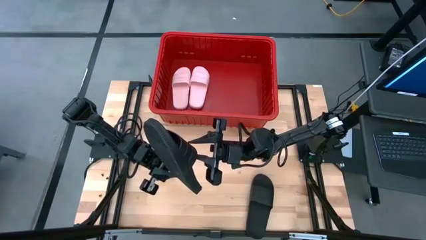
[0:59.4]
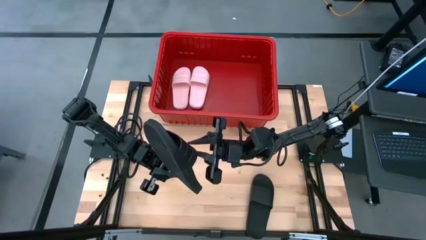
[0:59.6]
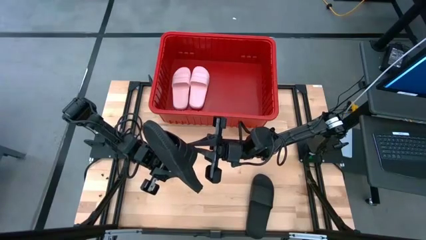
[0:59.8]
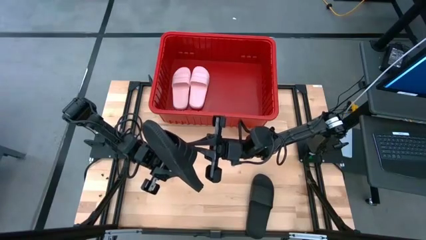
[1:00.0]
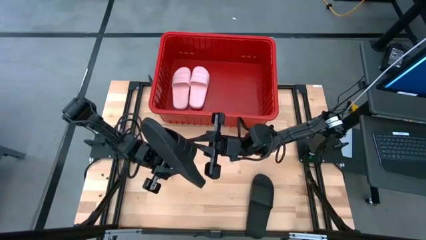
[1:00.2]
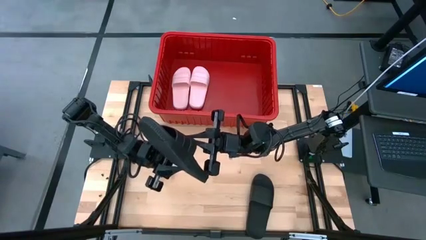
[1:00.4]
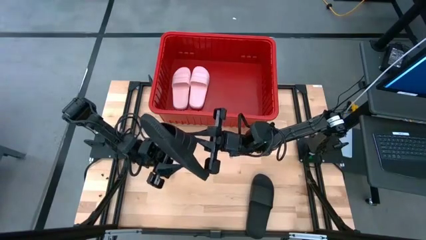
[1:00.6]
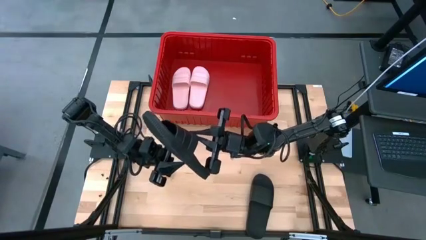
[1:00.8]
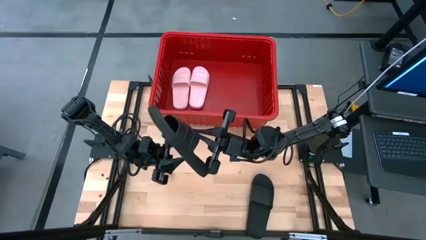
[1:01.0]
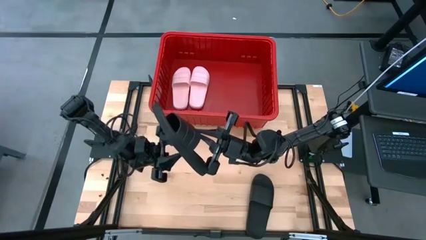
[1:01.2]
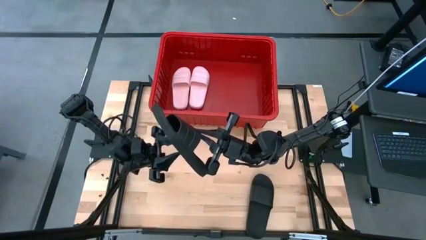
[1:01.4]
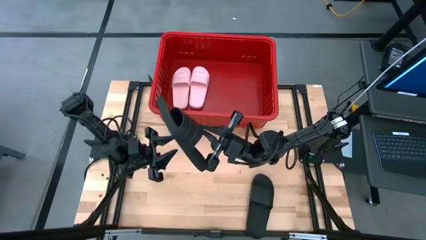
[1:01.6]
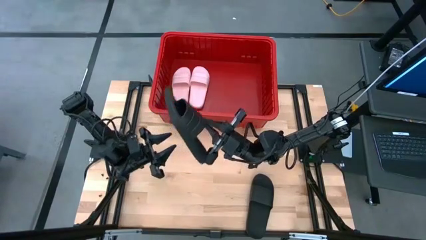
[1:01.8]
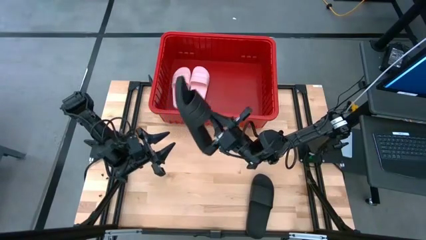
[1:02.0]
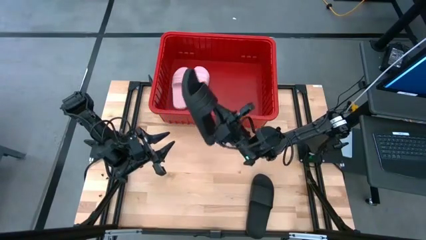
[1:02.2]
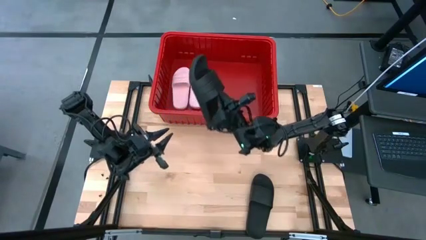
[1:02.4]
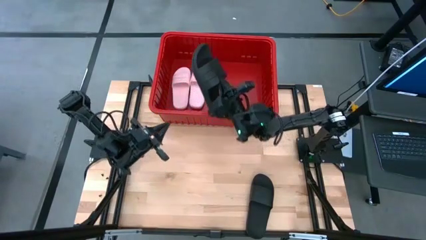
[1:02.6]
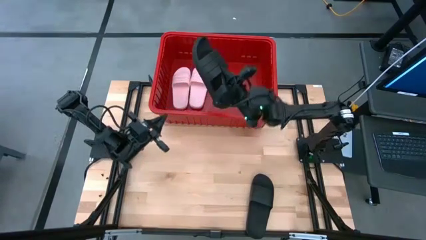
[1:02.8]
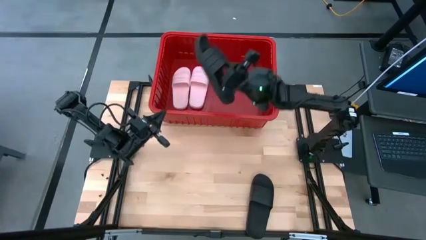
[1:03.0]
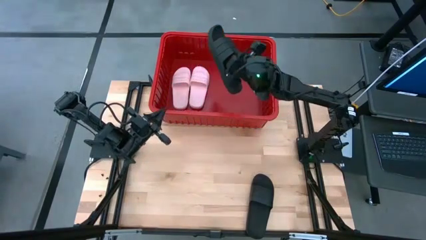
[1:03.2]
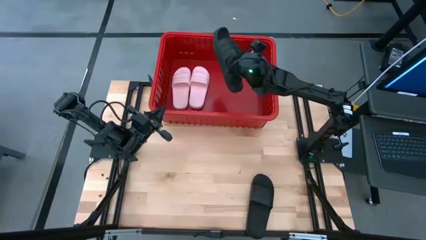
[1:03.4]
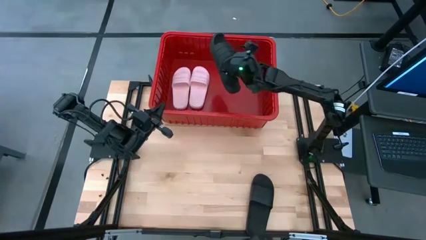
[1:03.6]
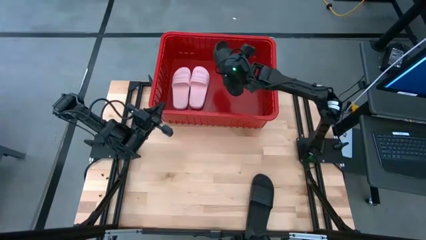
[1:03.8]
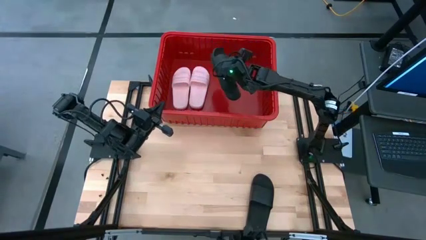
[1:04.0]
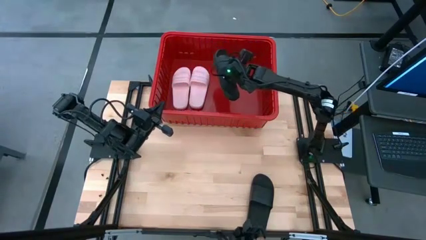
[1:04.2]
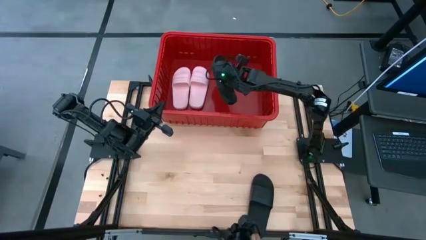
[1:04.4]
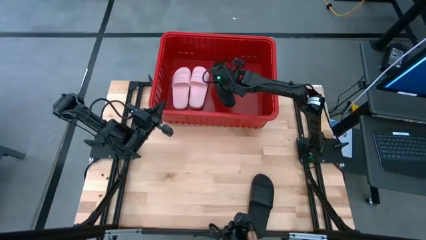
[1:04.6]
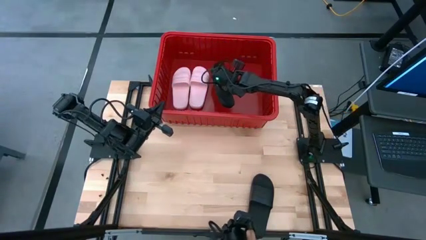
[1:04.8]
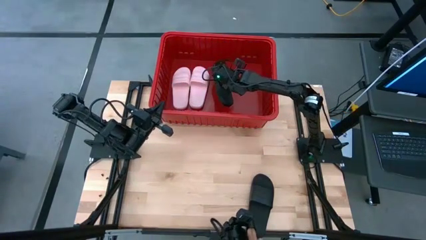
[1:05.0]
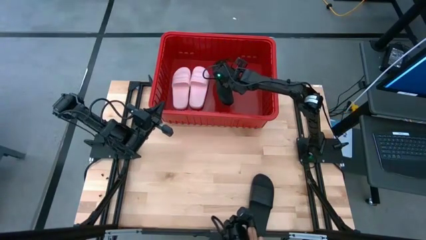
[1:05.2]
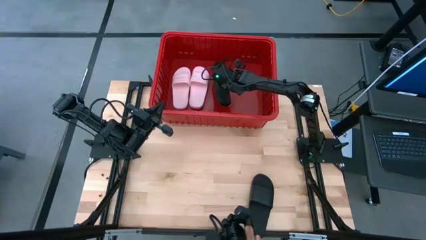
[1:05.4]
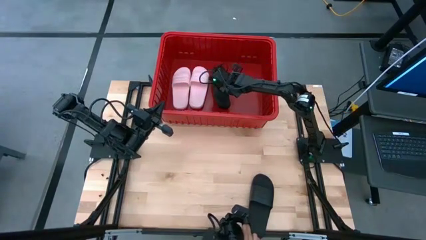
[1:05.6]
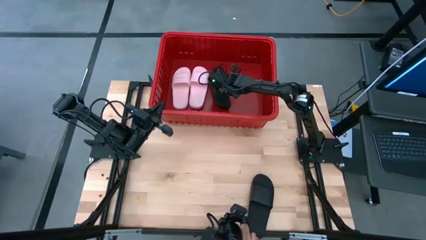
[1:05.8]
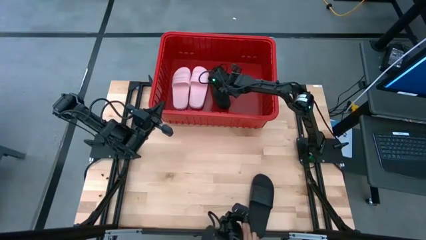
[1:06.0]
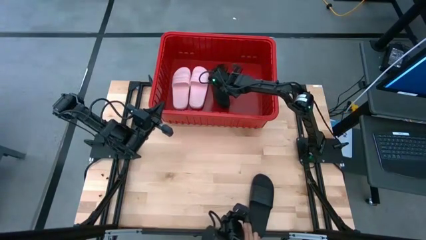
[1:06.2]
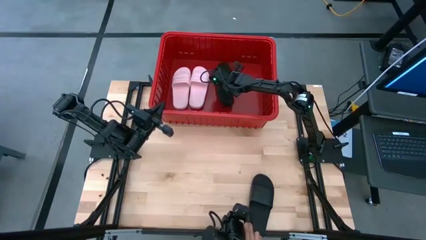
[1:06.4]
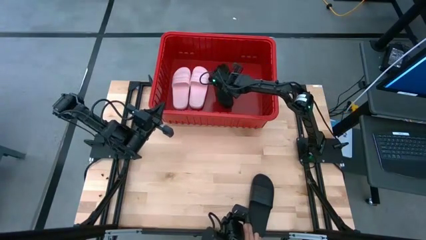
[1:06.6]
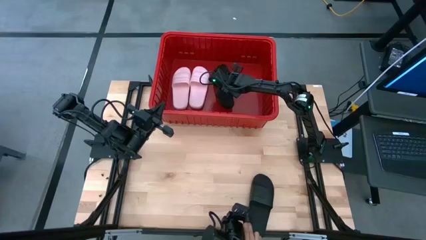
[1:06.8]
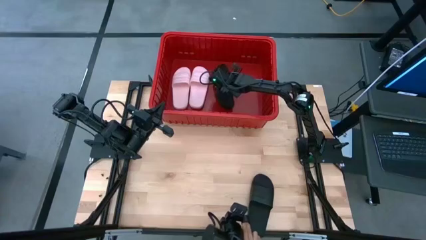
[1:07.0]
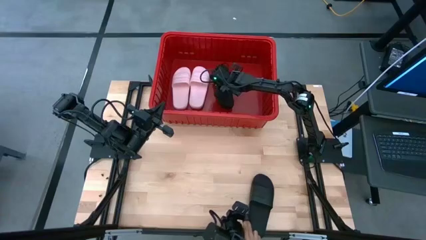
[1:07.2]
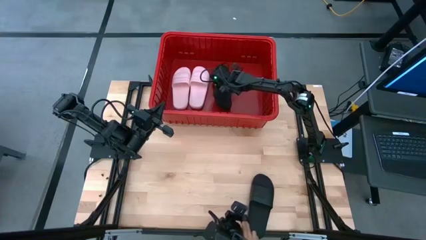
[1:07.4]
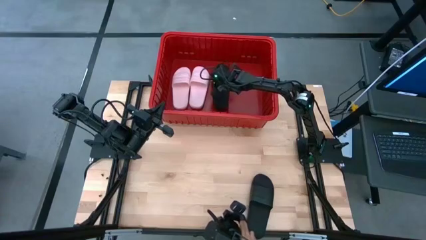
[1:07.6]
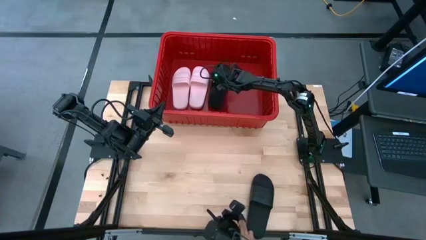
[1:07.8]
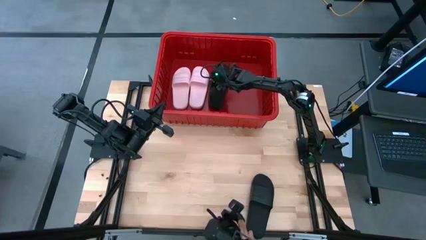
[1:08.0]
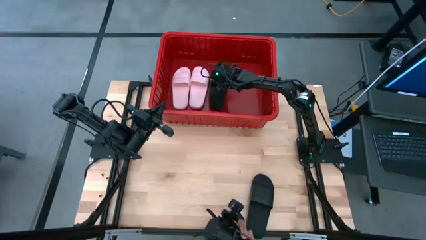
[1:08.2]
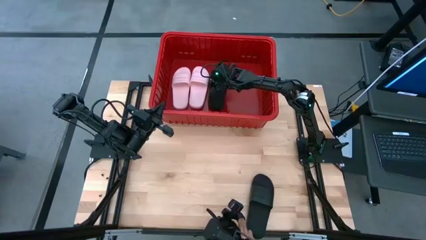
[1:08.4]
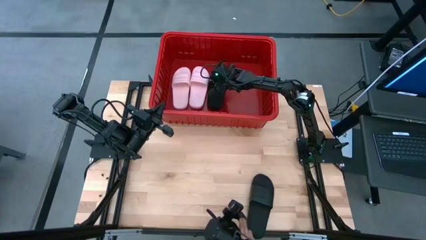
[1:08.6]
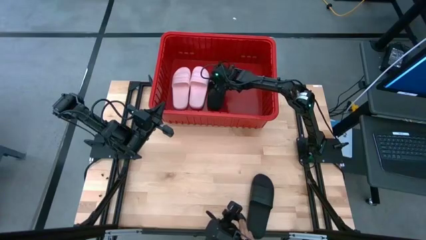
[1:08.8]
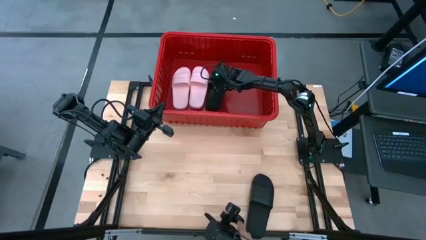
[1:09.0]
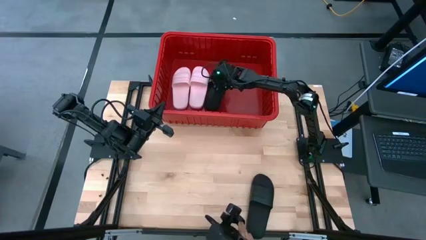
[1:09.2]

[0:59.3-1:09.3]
Task: Pick and place slides into bin
Put the left black slipper into the red bin

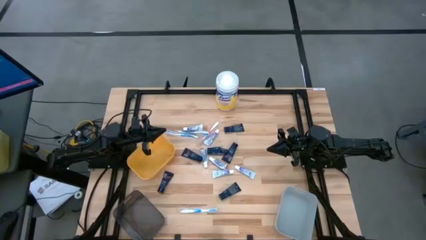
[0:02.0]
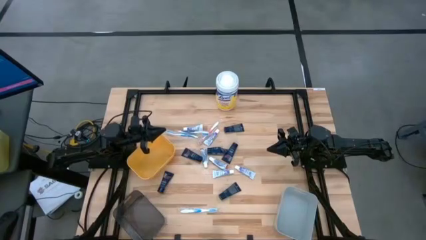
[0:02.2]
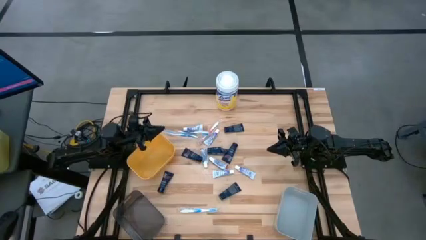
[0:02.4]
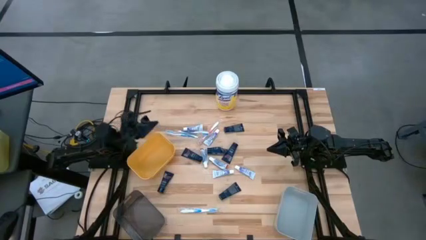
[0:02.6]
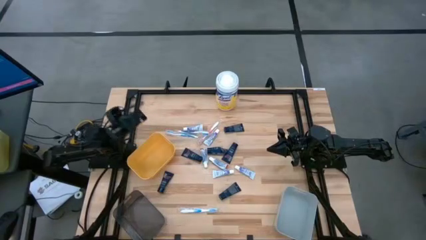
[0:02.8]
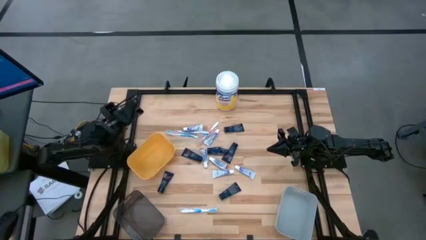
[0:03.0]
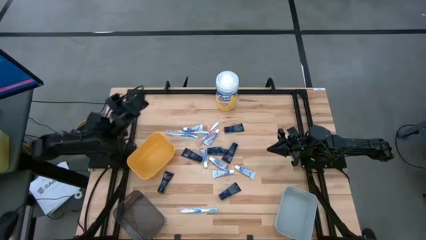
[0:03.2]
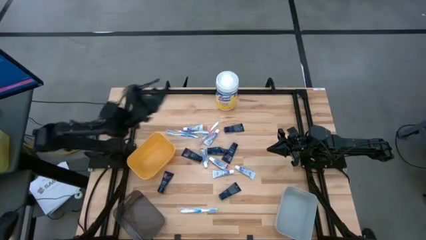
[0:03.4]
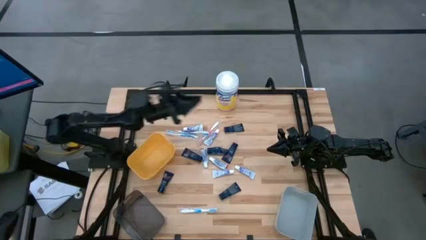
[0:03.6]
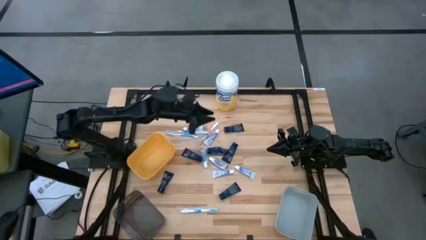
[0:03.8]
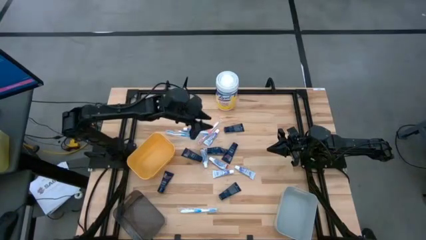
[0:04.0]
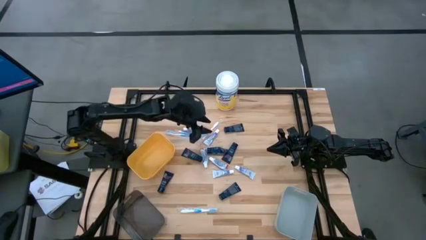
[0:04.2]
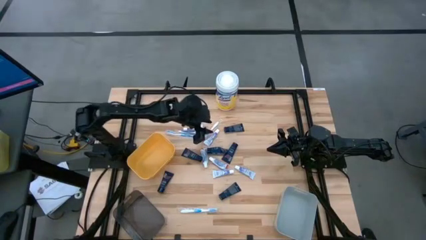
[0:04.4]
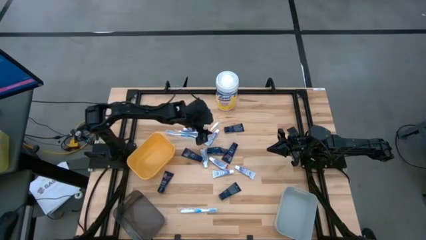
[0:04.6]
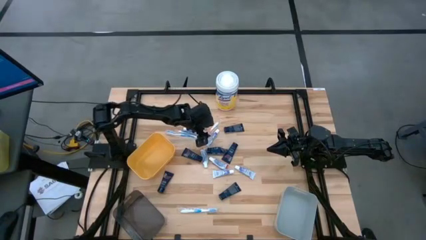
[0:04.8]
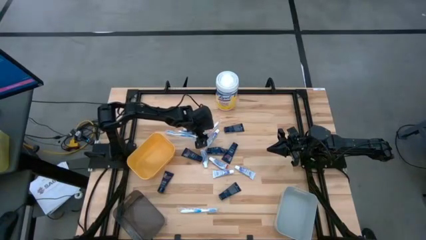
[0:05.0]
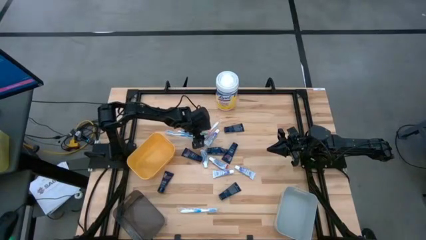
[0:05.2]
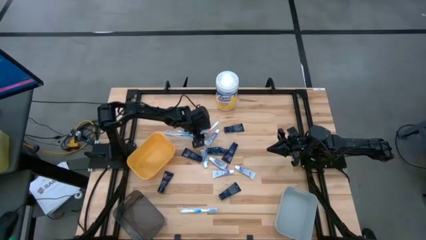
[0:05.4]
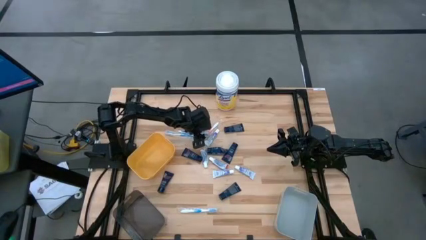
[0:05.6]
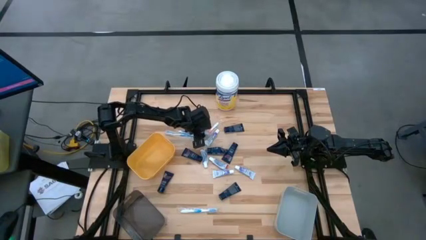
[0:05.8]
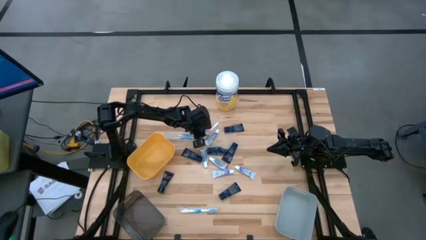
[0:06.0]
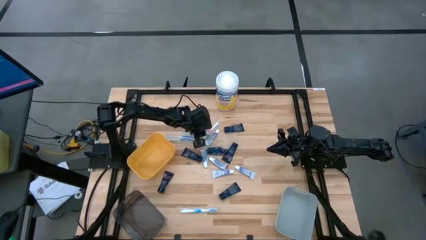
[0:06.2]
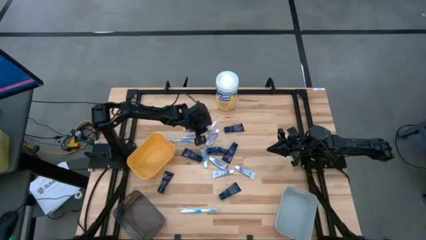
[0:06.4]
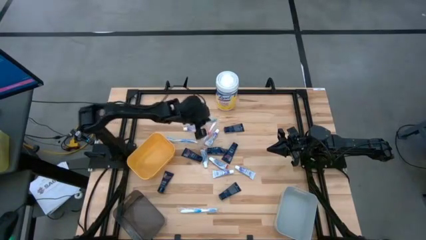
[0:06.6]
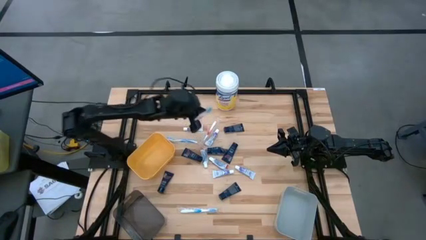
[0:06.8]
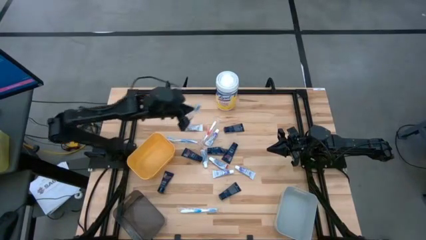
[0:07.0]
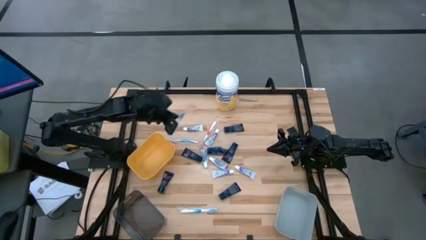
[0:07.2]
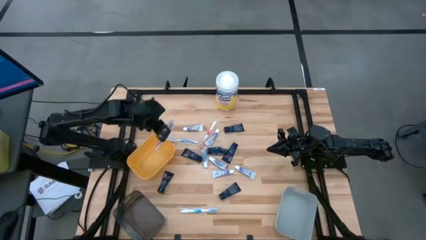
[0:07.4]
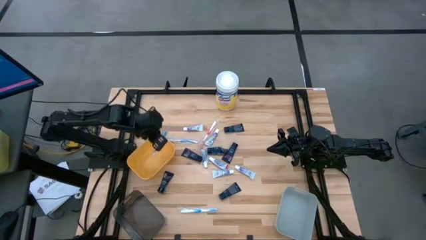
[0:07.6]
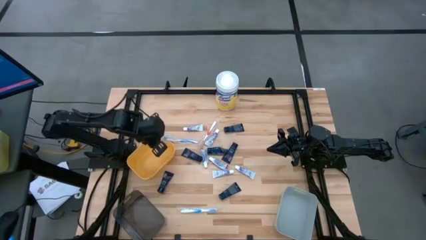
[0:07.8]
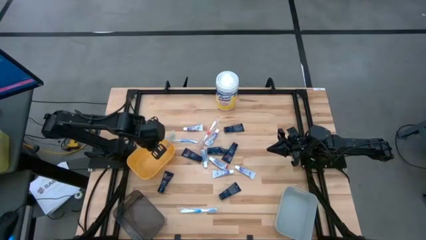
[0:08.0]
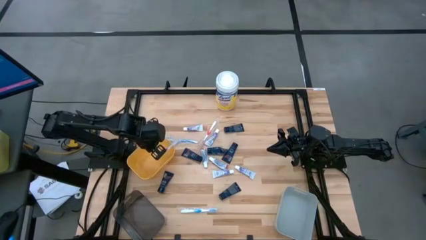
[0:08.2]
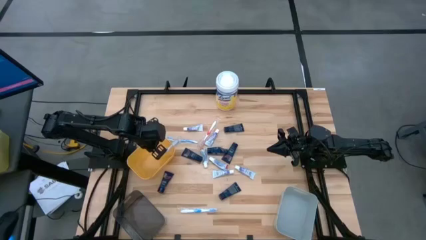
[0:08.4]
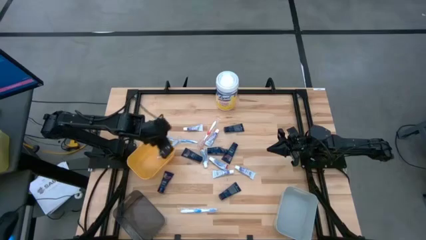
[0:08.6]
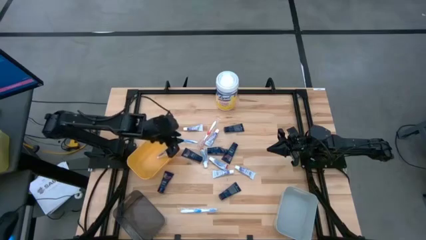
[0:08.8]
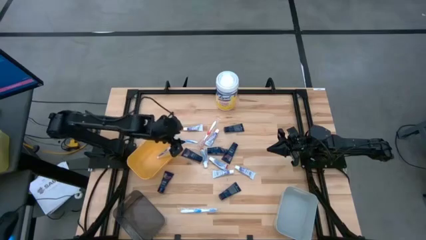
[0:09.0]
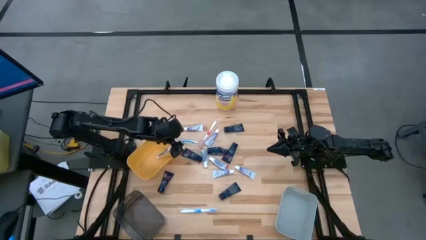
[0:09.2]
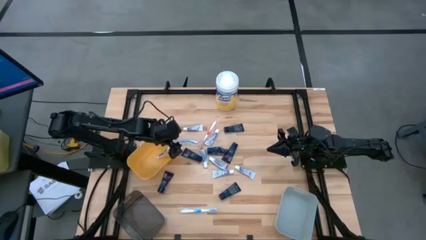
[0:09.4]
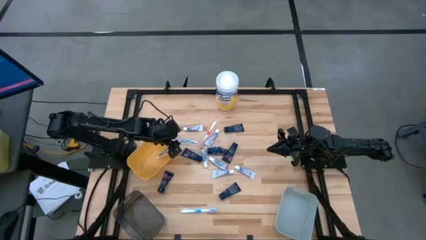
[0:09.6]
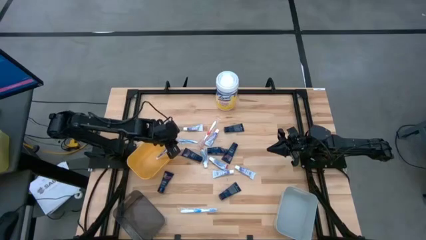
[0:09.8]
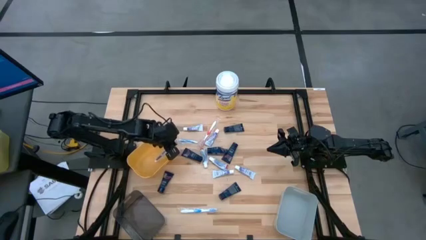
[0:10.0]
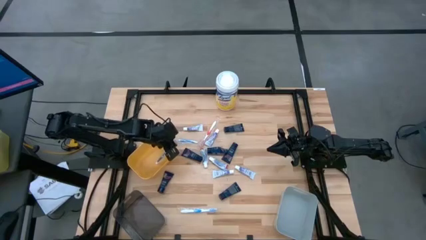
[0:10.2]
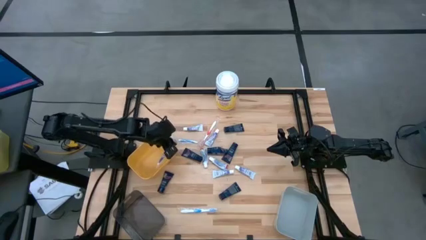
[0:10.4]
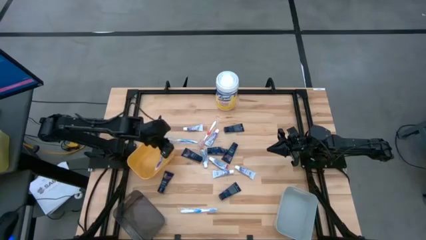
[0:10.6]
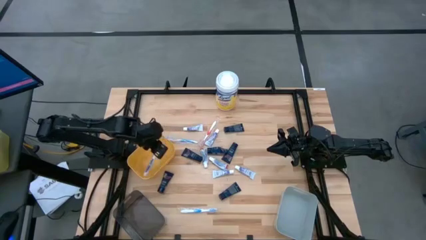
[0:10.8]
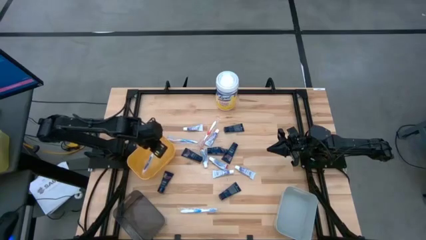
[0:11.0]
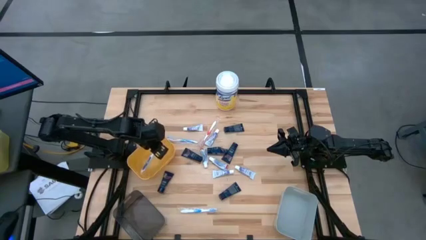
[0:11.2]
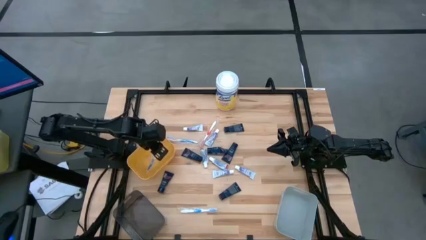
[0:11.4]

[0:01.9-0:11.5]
Task: Pick & Place Travel size toiletries
Put the dark blue toothbrush into the yellow bin
